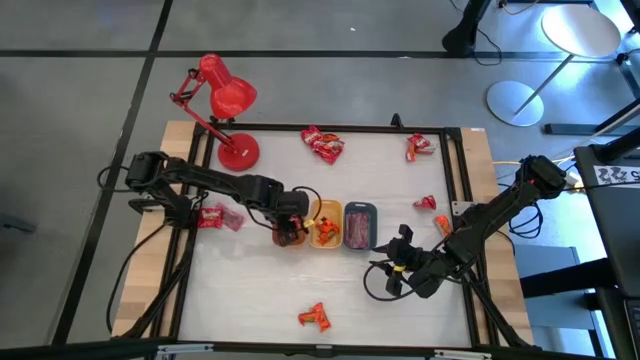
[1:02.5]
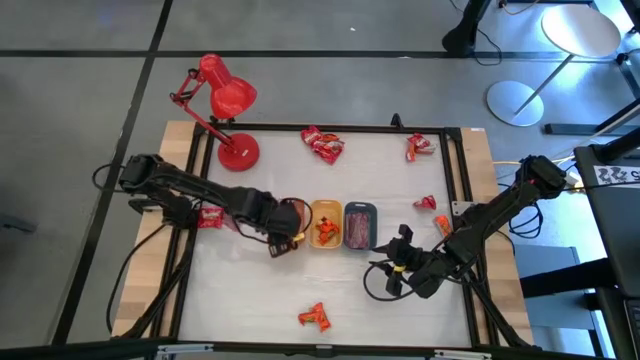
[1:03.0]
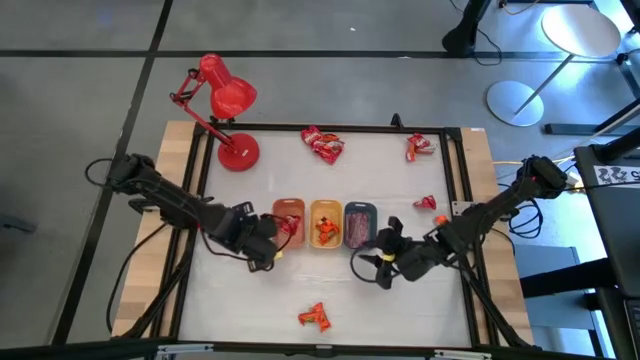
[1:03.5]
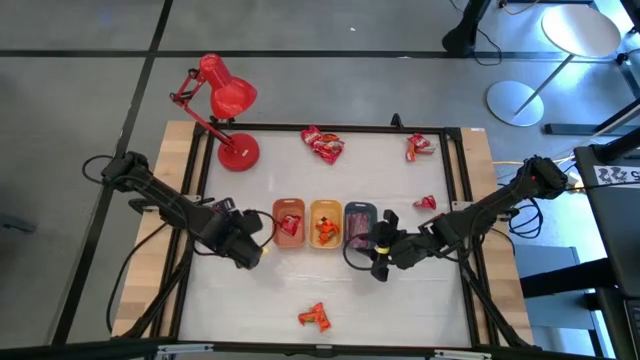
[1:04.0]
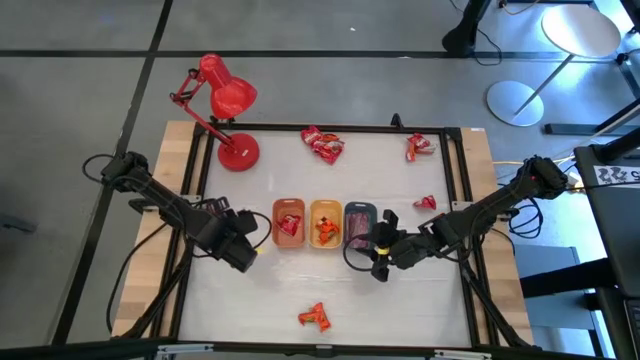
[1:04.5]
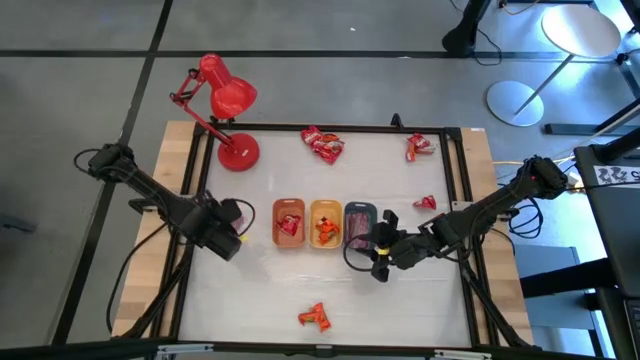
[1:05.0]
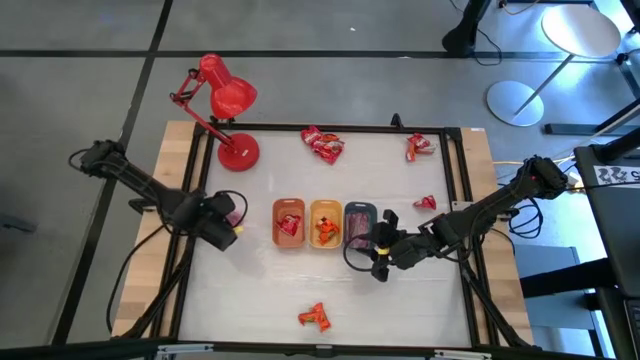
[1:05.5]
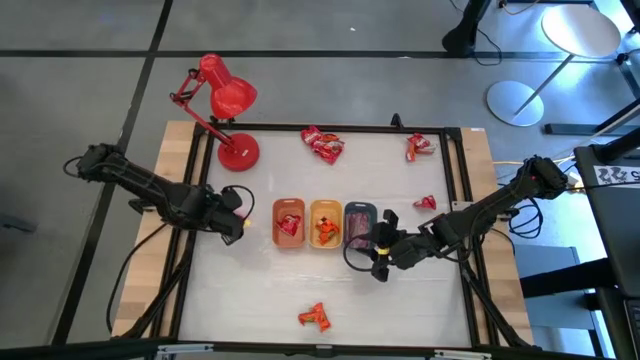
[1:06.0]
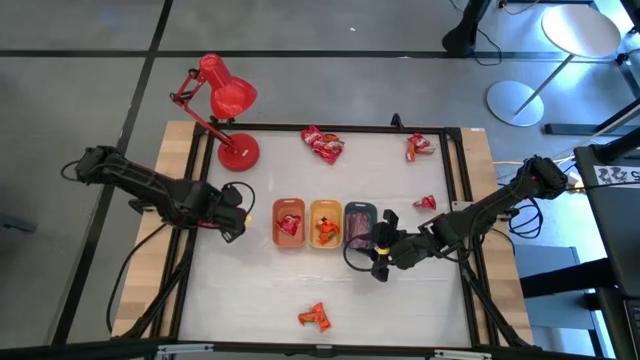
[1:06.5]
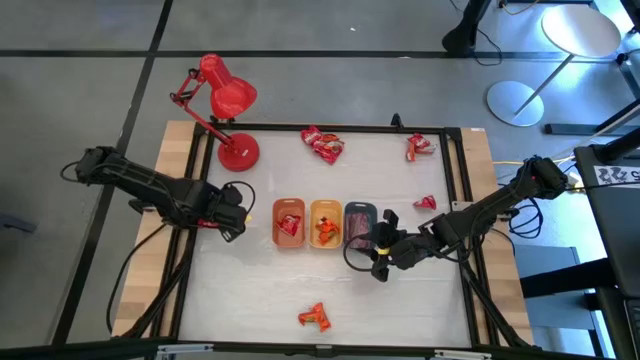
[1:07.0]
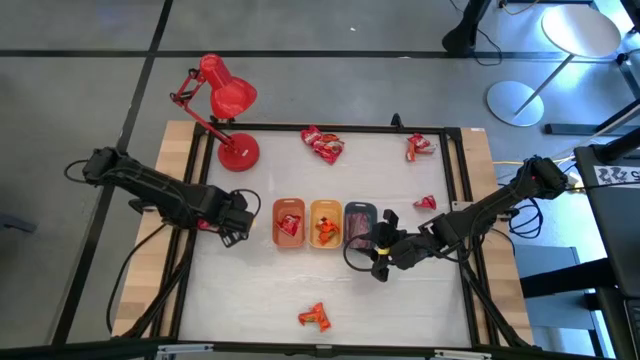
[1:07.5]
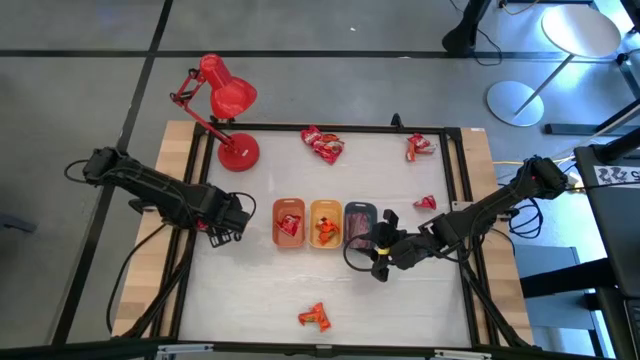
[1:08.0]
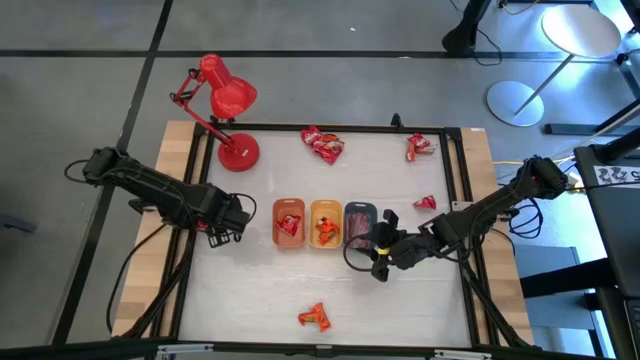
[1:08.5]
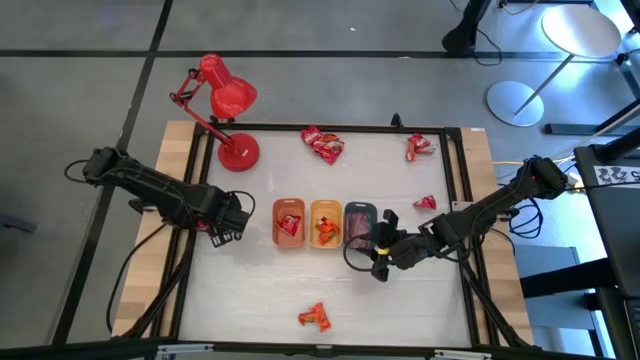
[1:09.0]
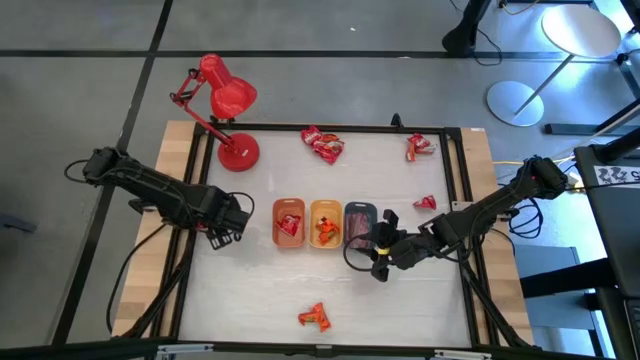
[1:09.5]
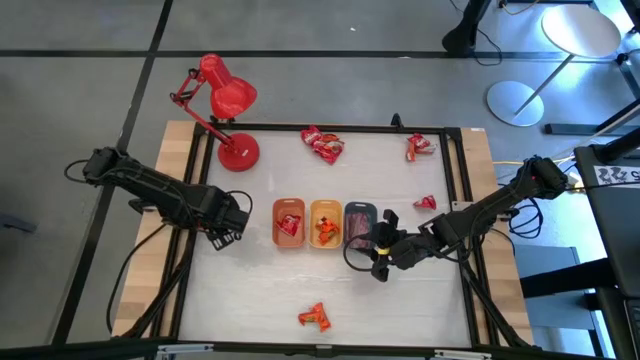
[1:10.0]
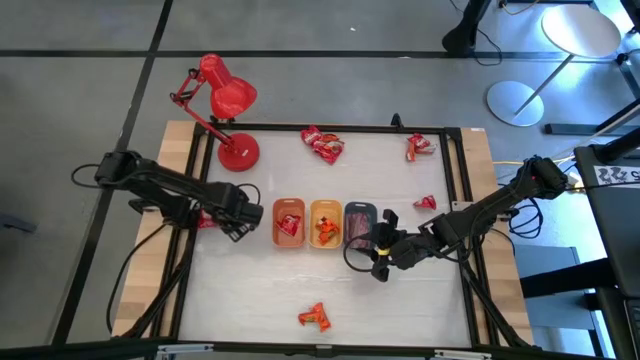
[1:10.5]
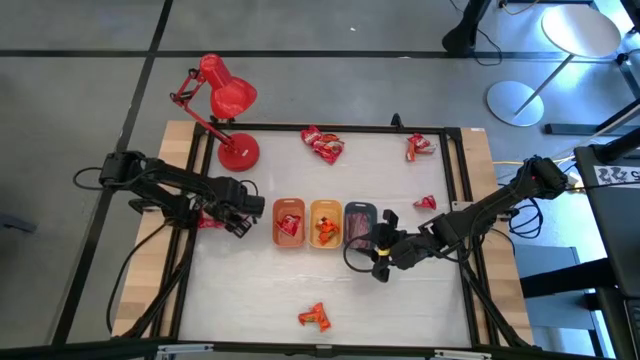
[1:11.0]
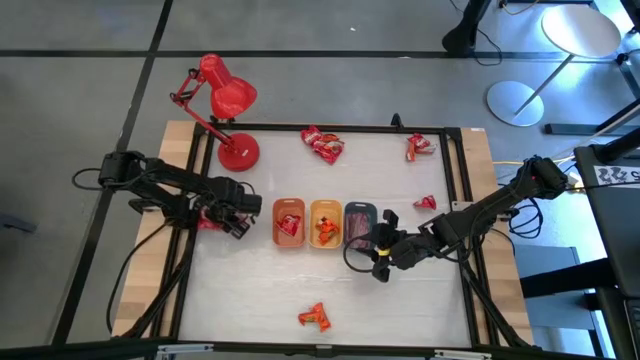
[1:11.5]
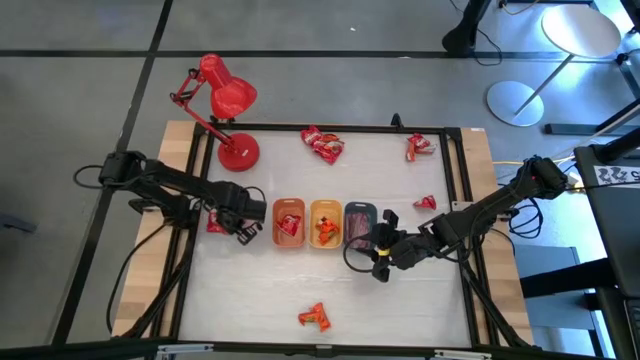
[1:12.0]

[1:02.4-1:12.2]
Task: Sort candy
Put the red candy into the orange bin

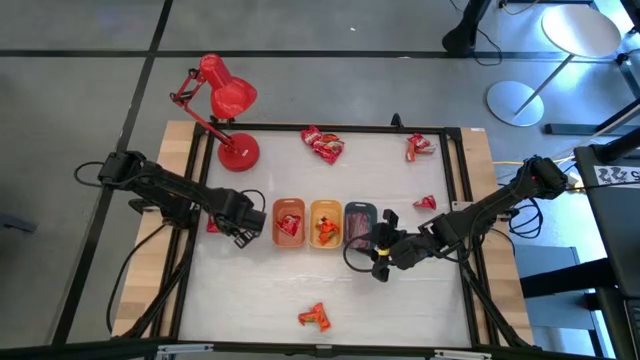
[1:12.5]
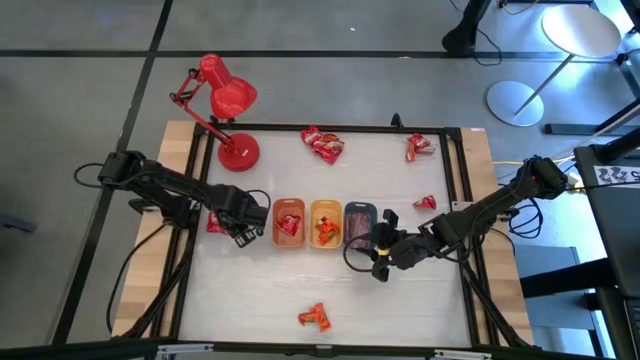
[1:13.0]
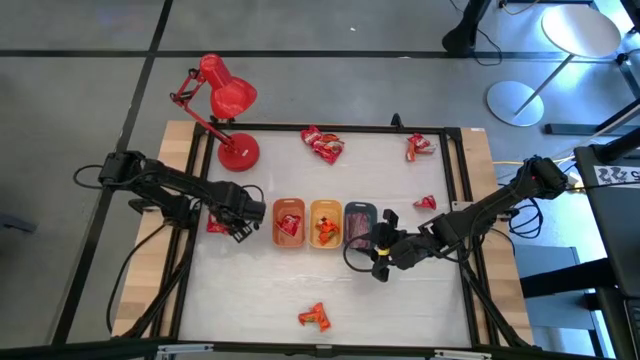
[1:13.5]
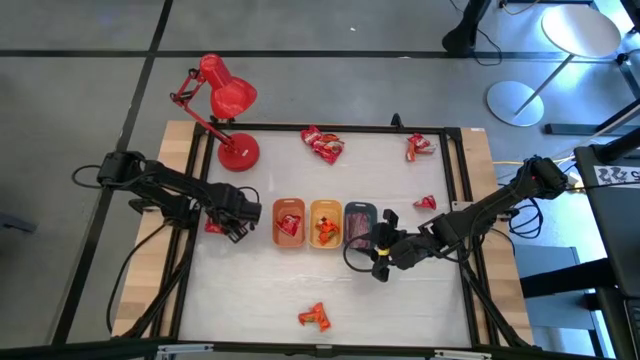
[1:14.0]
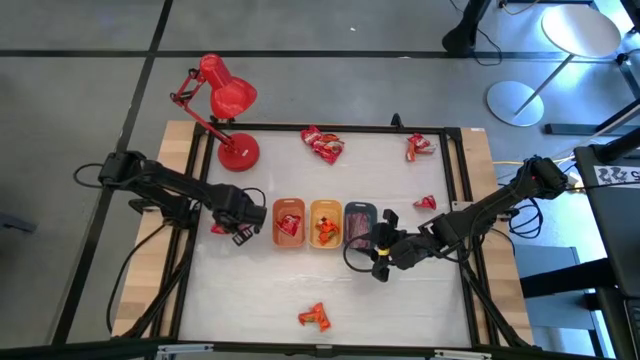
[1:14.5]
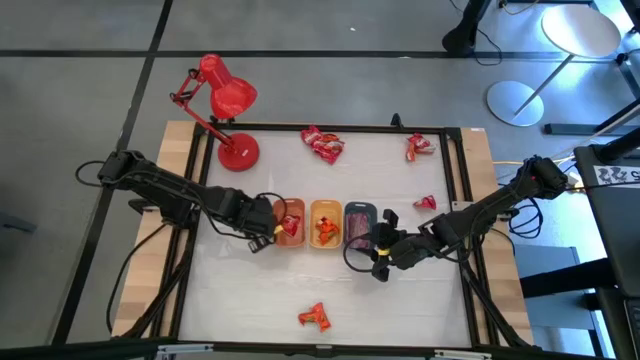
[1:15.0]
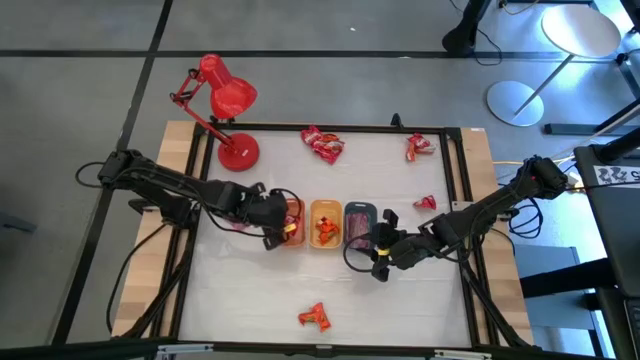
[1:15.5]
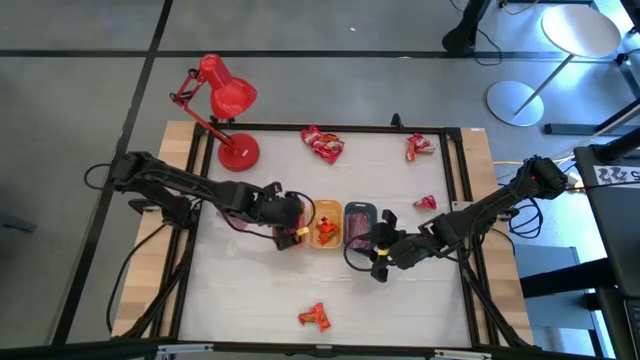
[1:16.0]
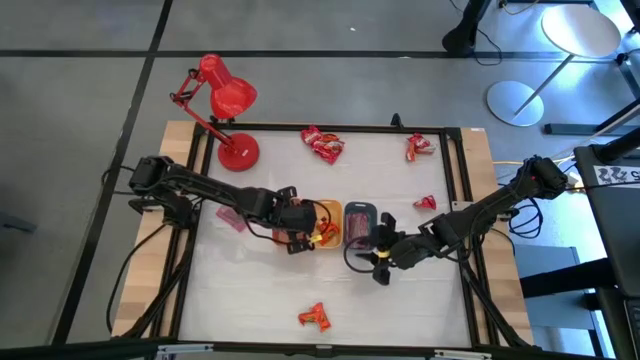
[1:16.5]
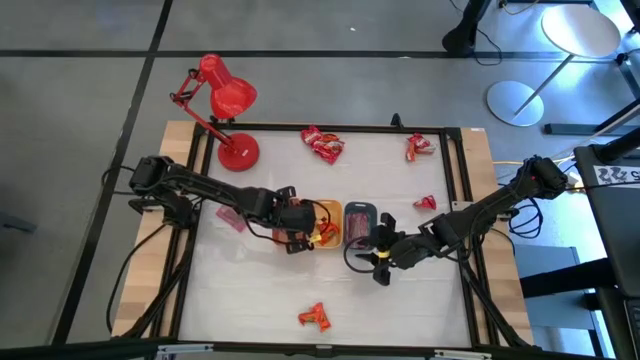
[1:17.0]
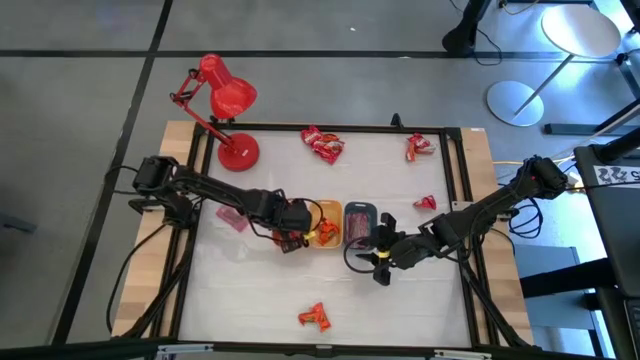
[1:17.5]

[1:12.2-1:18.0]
Put the red candy into the orange bin

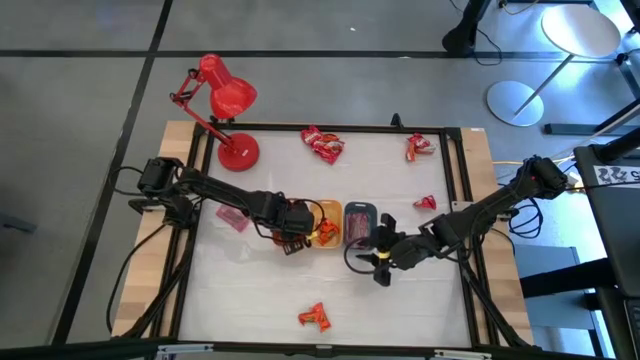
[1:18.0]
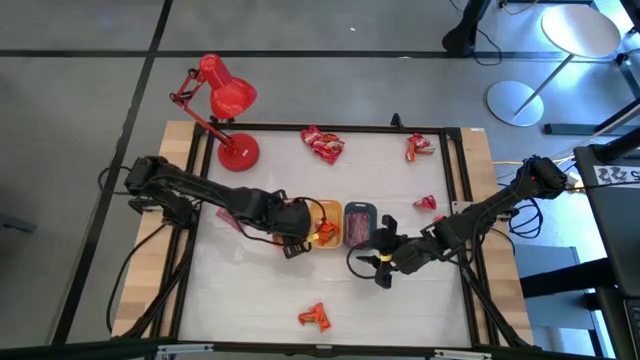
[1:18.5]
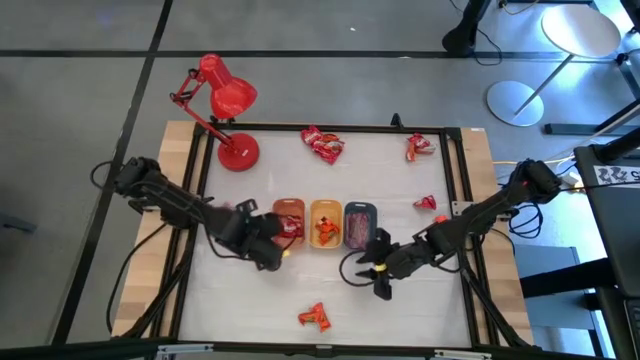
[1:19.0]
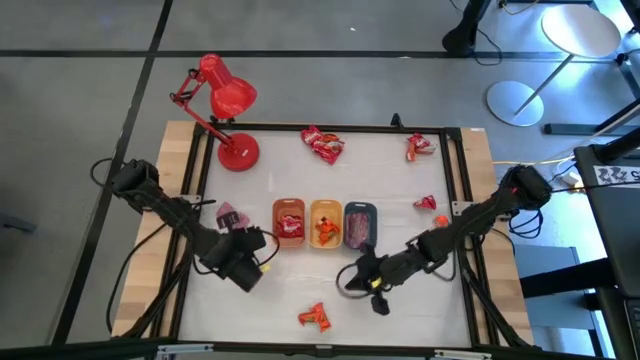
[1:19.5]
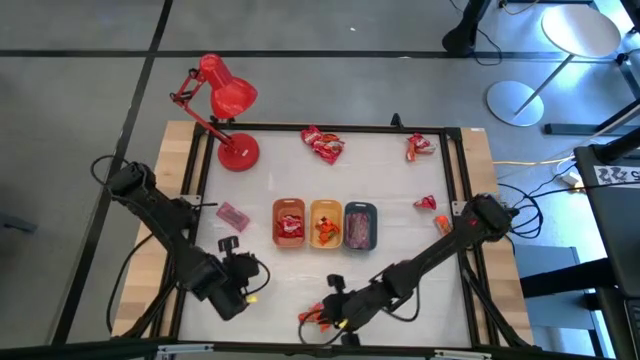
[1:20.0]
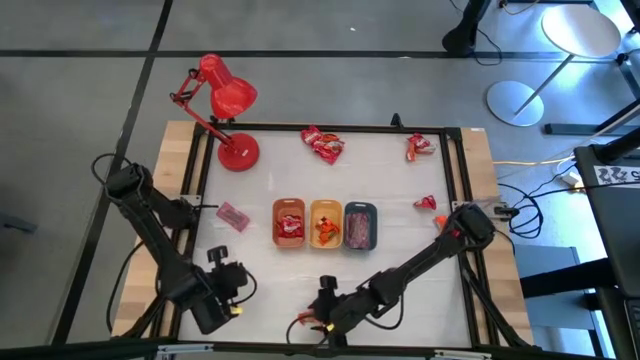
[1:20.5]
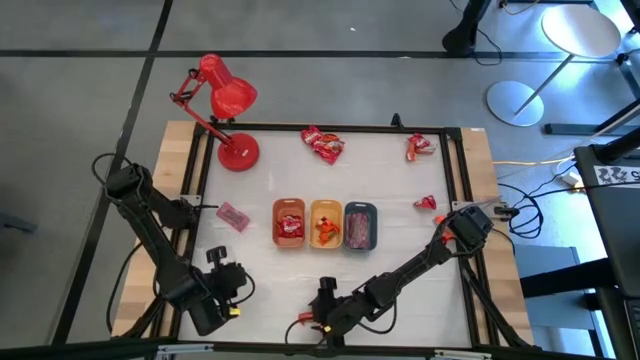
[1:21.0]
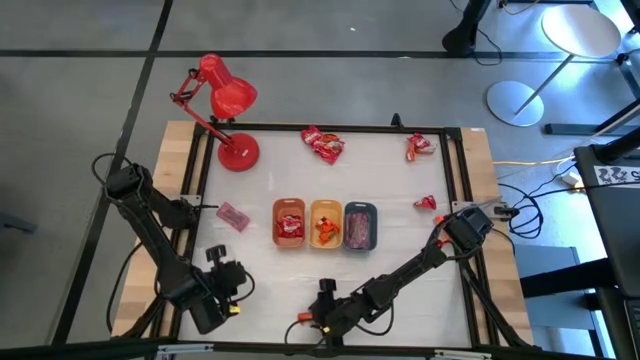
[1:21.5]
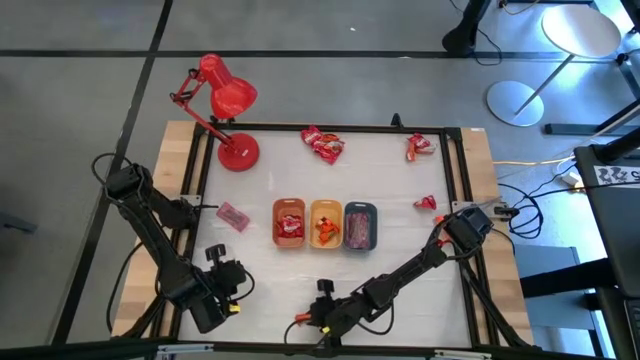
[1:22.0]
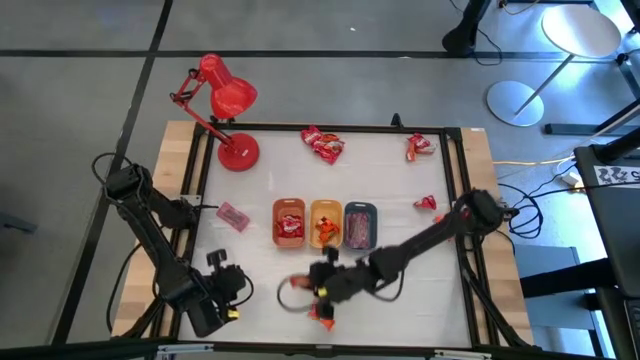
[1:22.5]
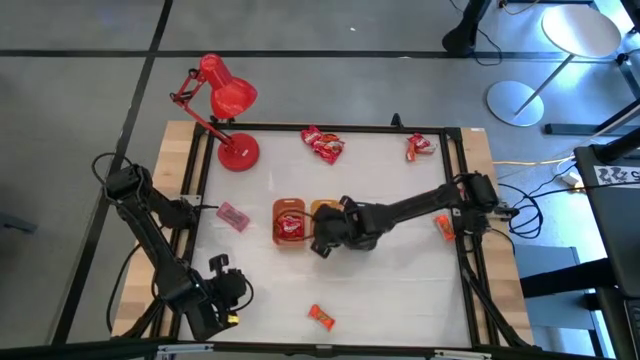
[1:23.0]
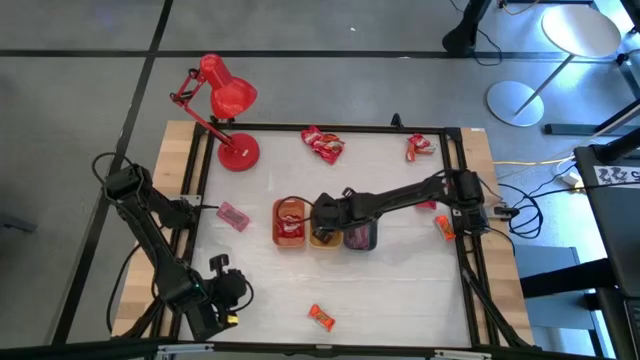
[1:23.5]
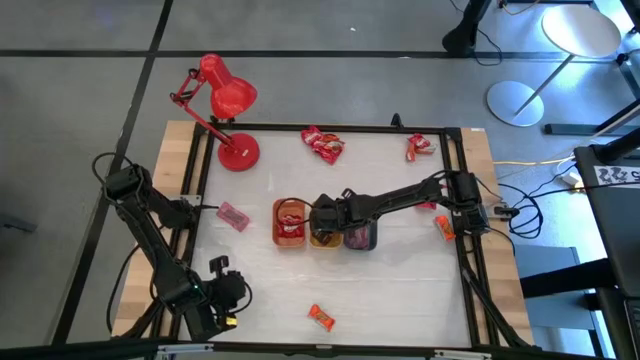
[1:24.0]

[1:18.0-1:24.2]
Put the orange candy into the yellow bin
